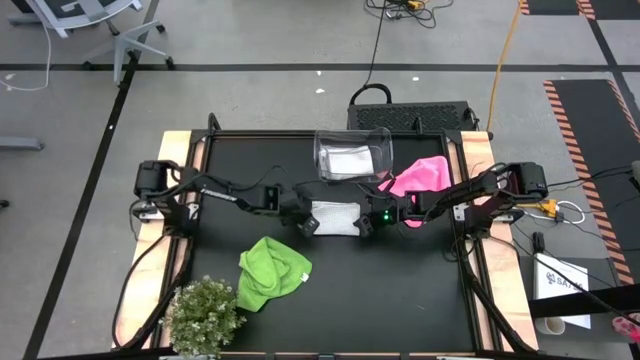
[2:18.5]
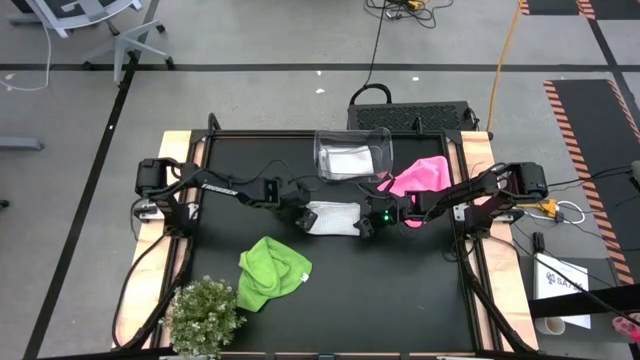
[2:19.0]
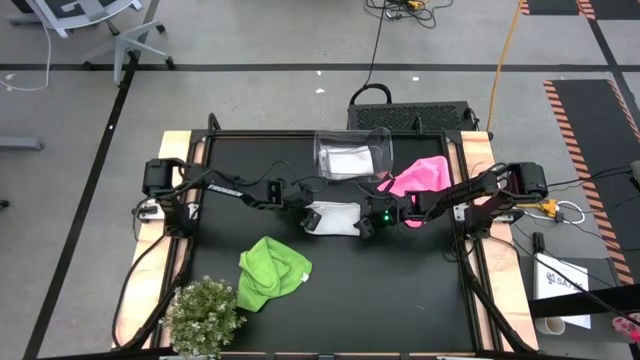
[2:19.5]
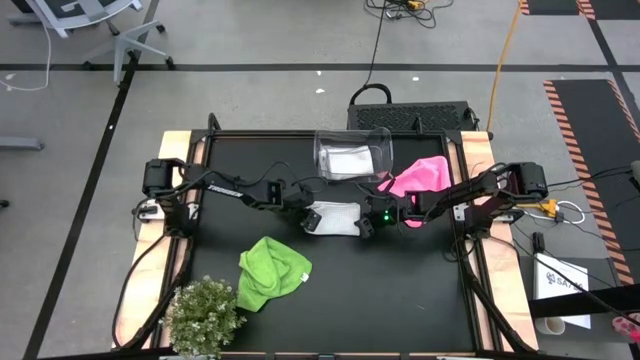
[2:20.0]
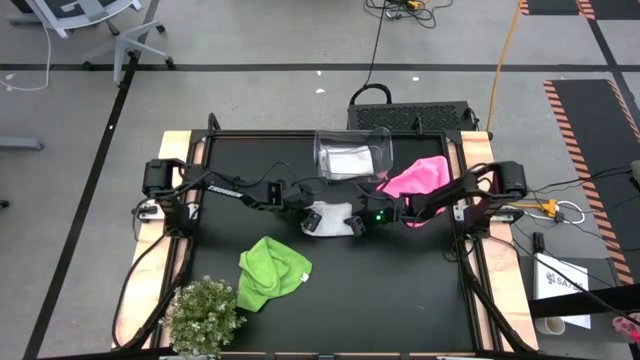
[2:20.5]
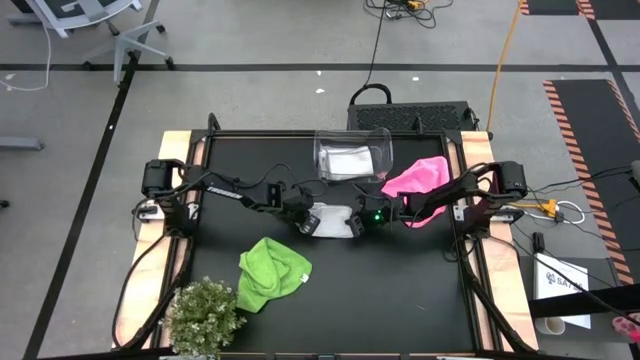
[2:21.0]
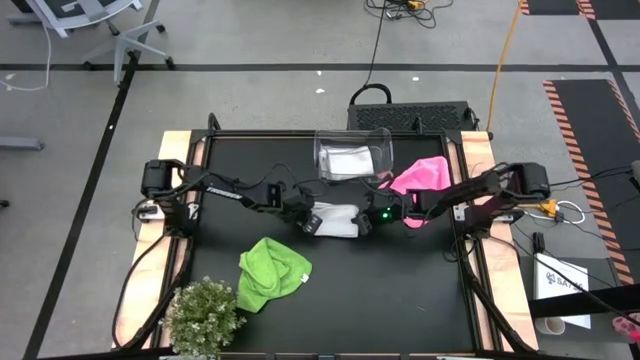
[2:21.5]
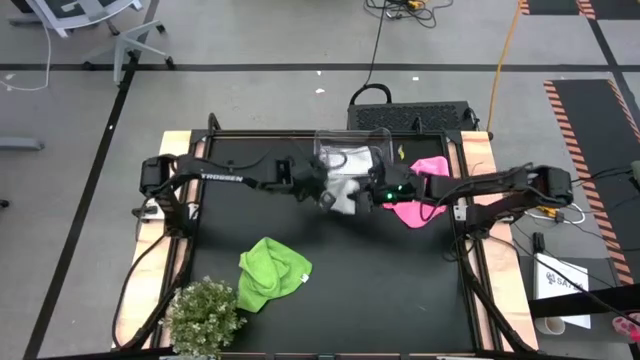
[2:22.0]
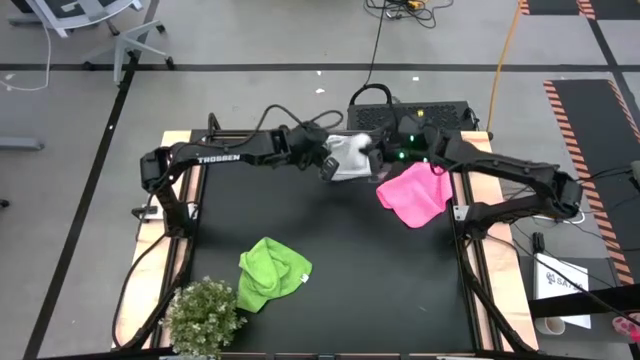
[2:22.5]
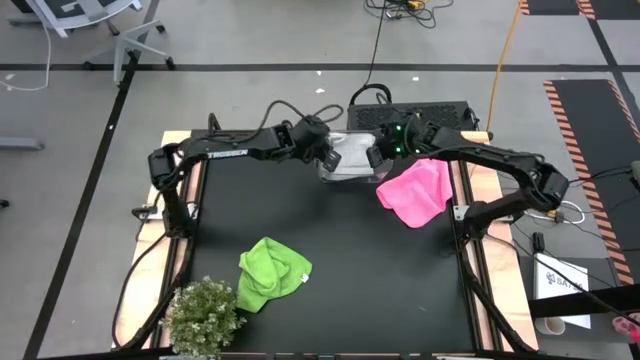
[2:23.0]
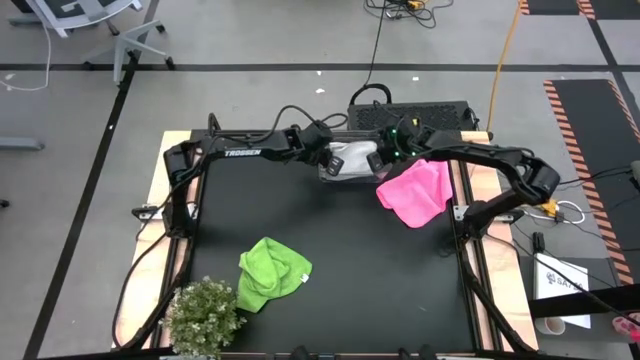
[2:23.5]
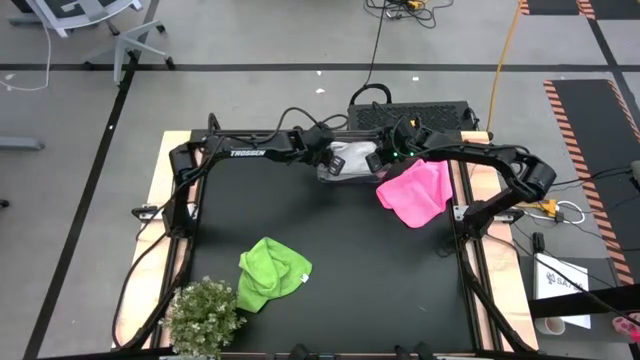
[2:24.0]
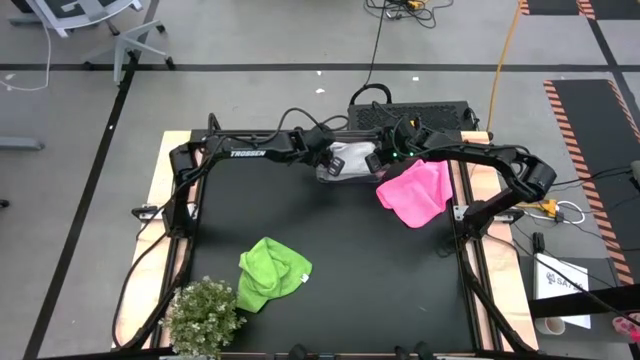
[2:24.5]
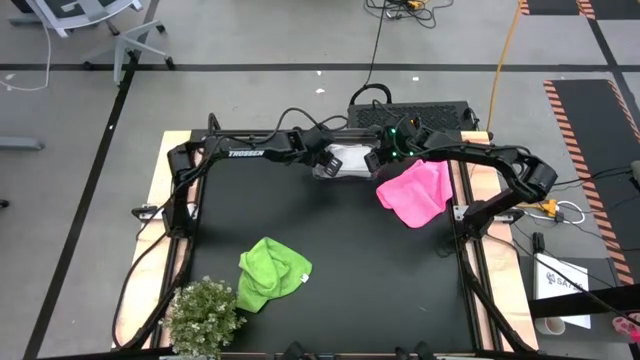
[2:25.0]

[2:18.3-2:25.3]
Task: Fold microfiber towels
Stack the folded gray microfiber cloth on top of the gray microfiber cloth in the transparent bin

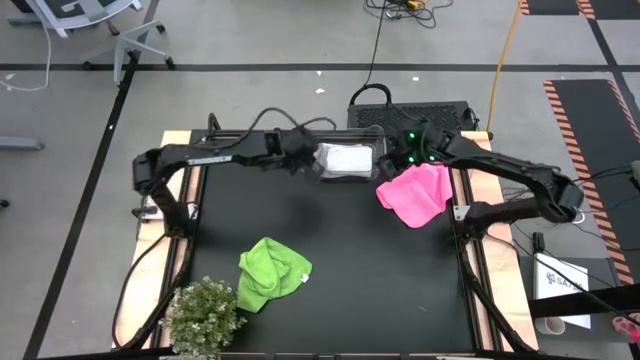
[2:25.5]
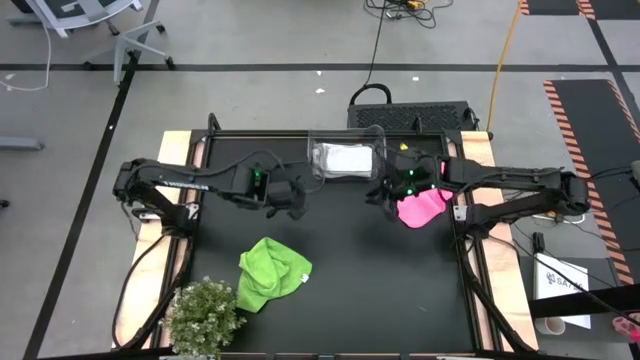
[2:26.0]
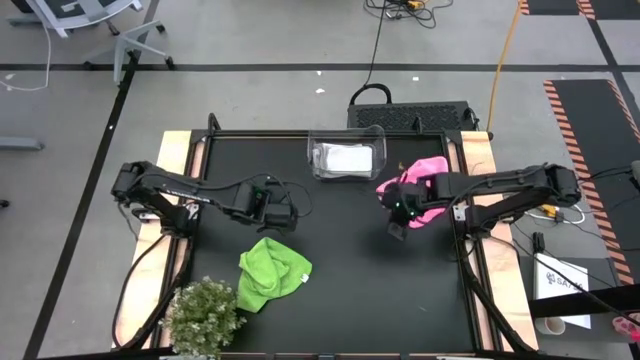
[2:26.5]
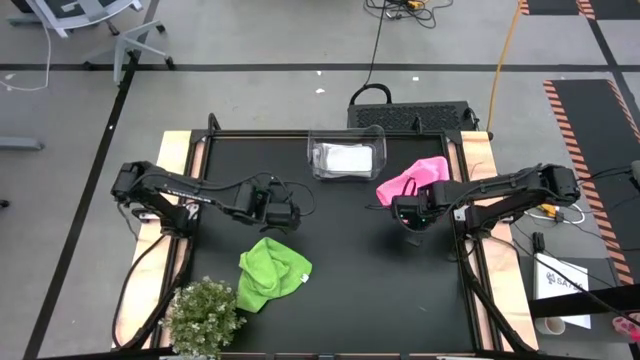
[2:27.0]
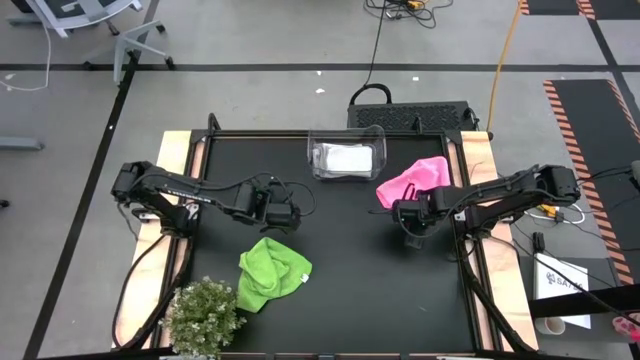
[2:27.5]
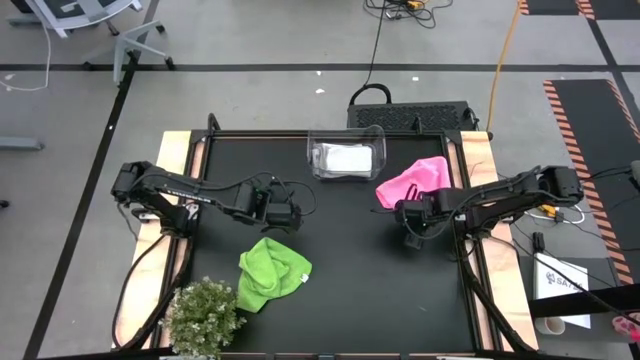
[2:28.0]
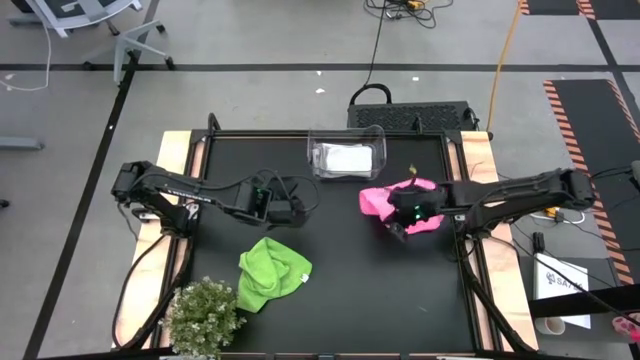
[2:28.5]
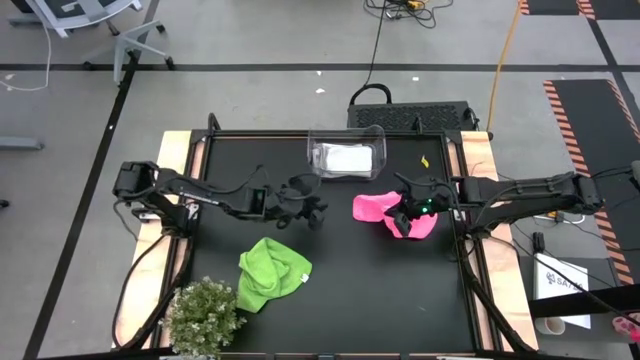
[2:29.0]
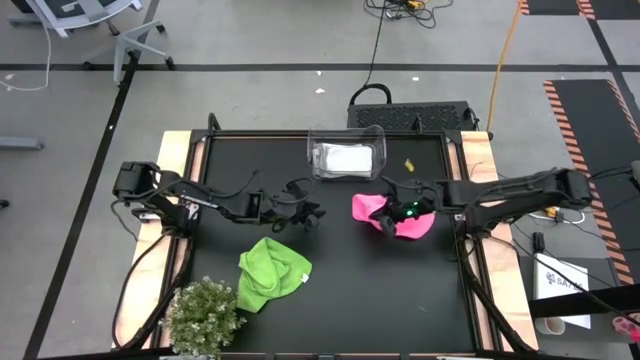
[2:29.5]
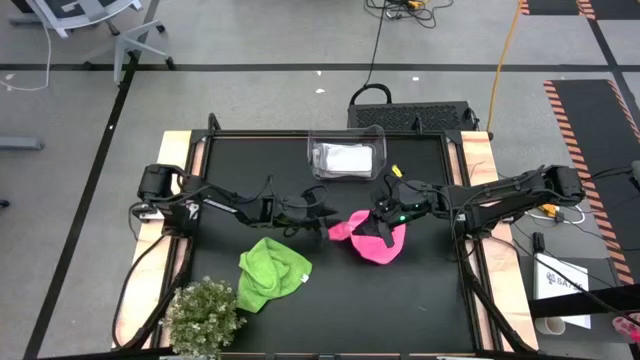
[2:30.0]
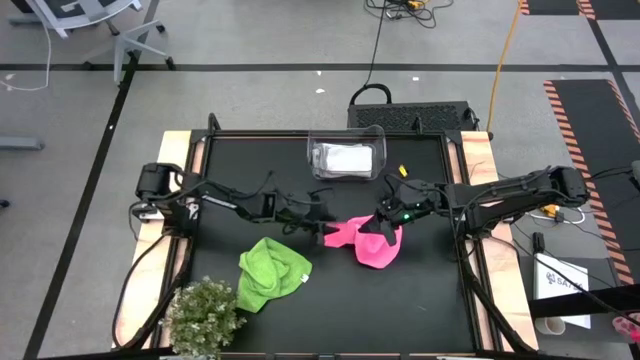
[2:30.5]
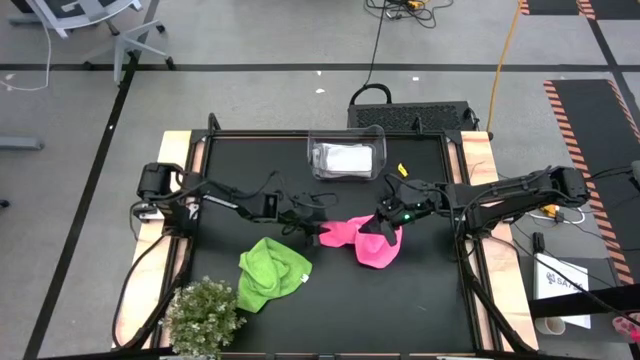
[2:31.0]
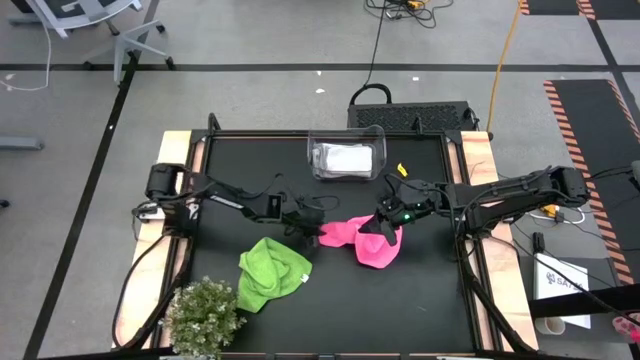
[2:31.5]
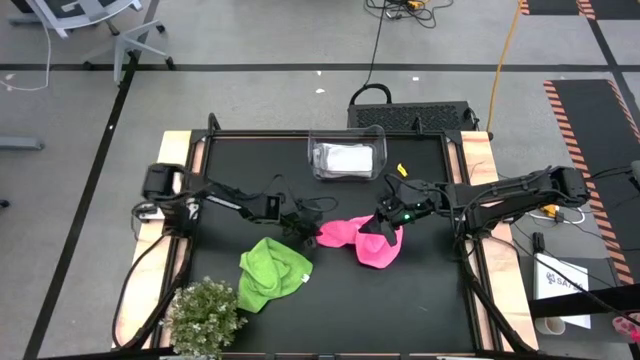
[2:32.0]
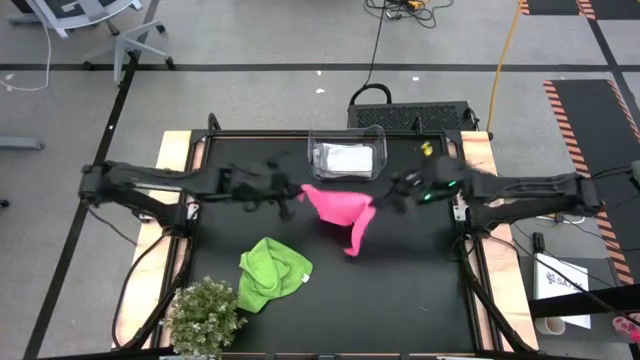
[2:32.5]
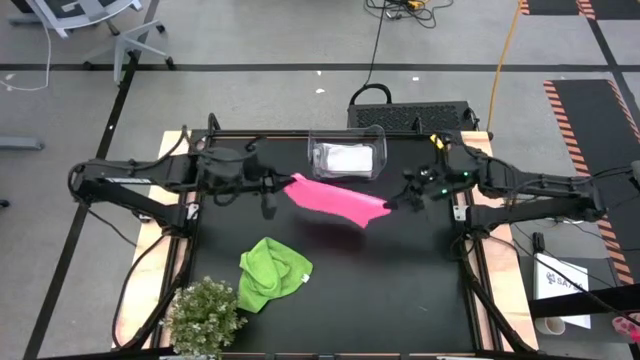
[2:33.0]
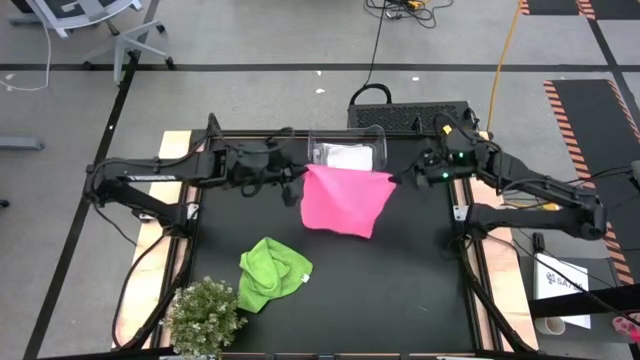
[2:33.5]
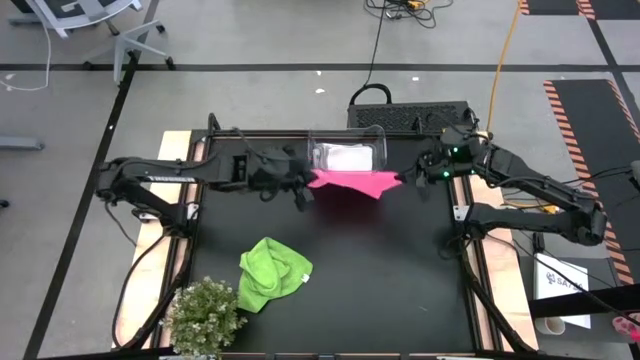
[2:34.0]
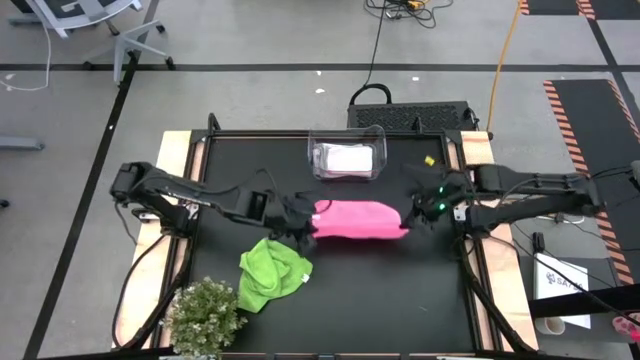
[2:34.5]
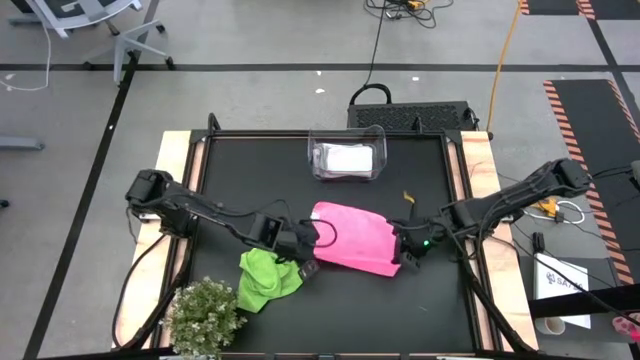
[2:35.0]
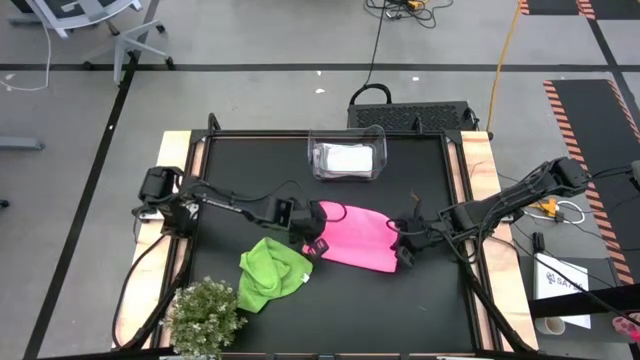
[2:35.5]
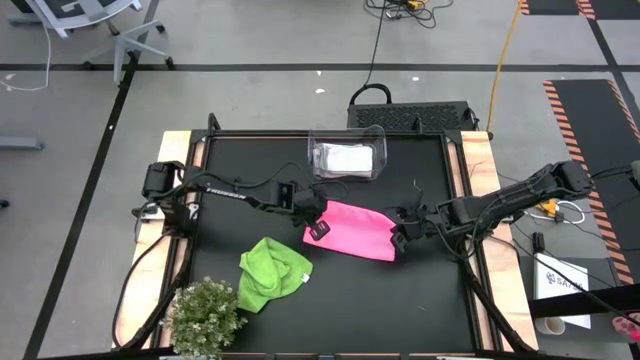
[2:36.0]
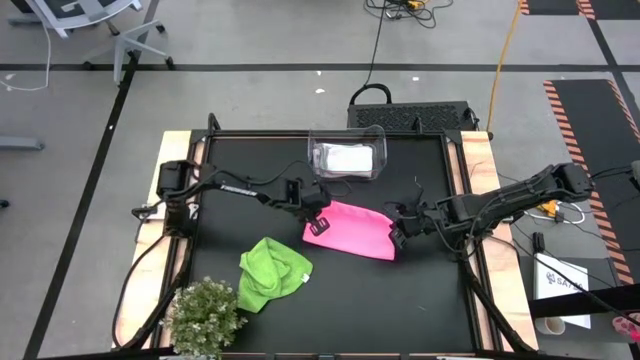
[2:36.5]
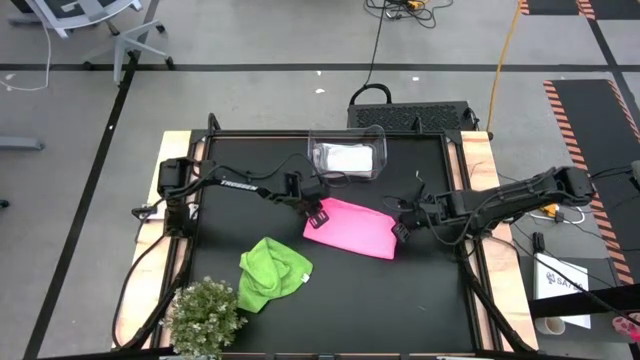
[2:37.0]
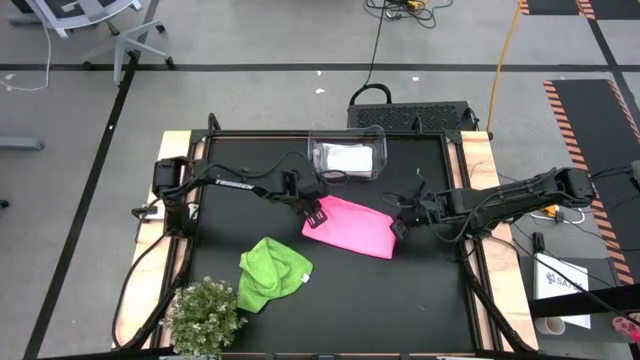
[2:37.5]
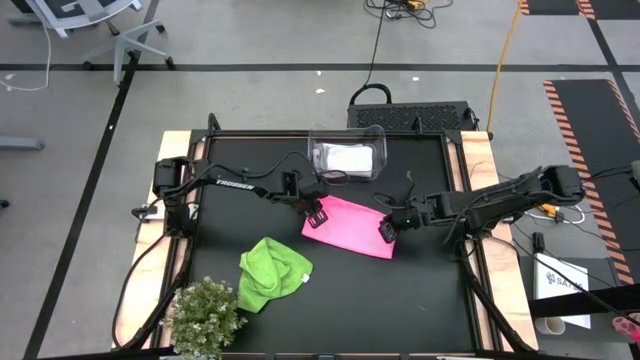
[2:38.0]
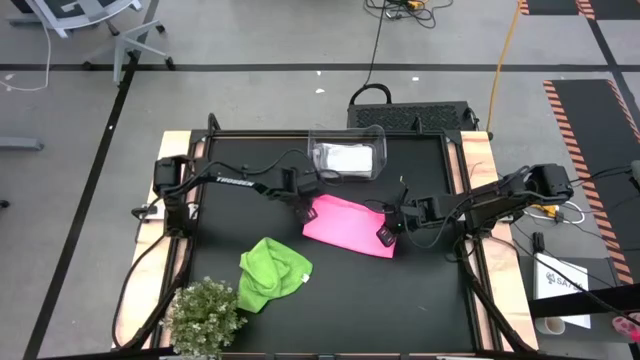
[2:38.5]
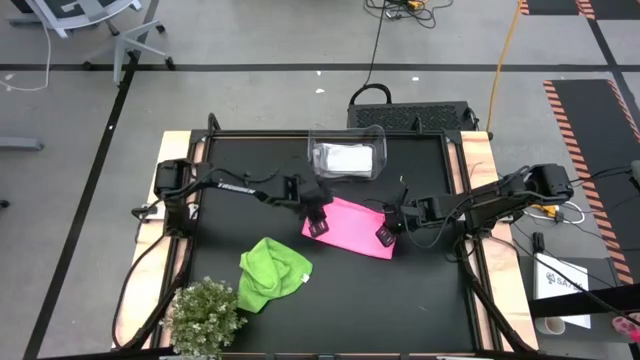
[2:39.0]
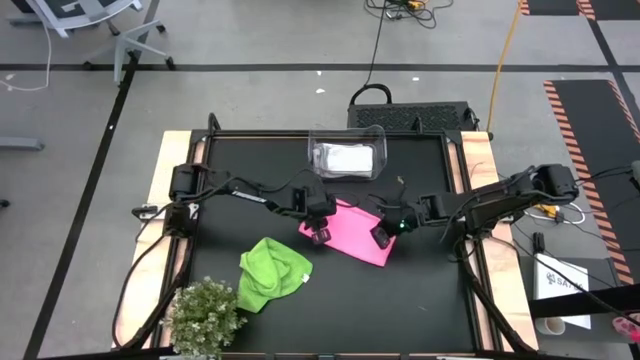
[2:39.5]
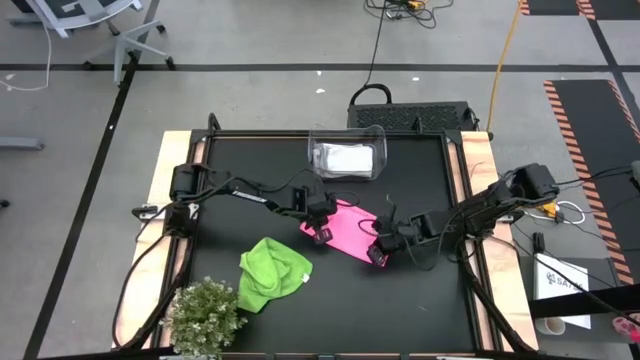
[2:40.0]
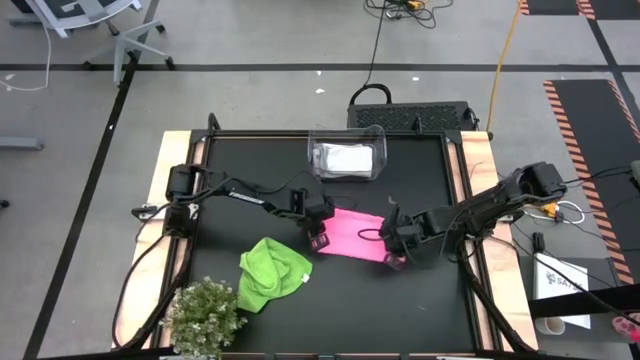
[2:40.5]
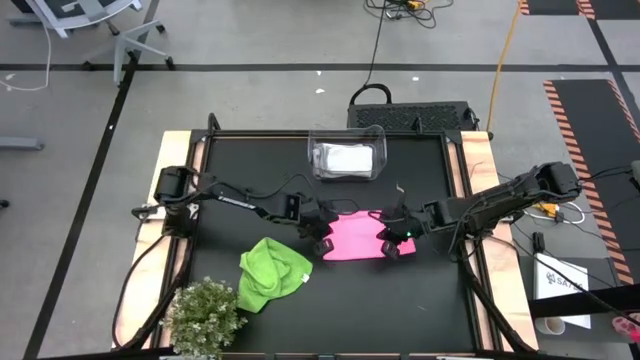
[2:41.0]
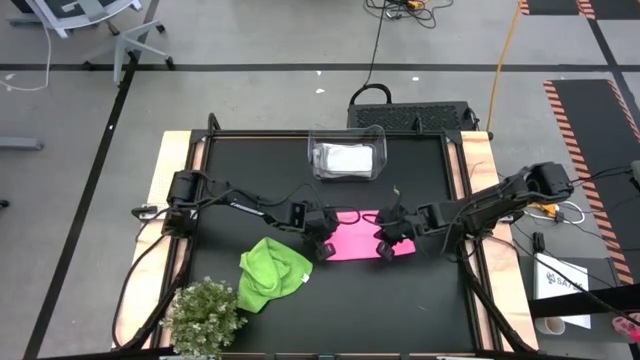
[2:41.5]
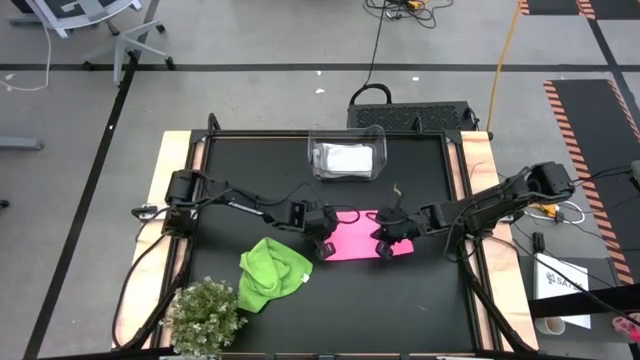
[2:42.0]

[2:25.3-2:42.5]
Fold the pink microfiber cloth
